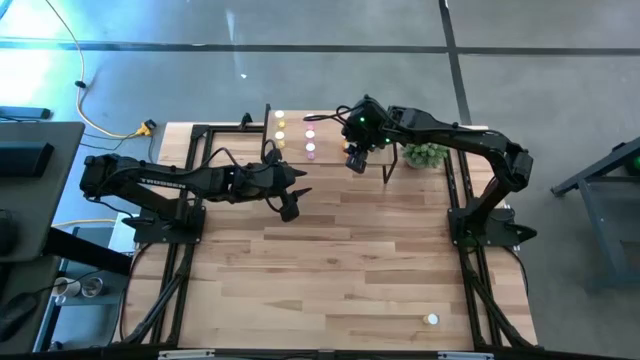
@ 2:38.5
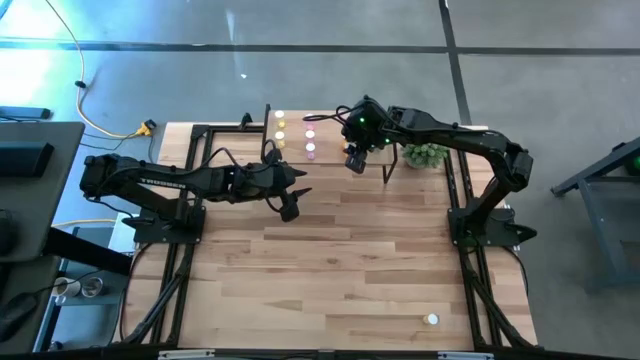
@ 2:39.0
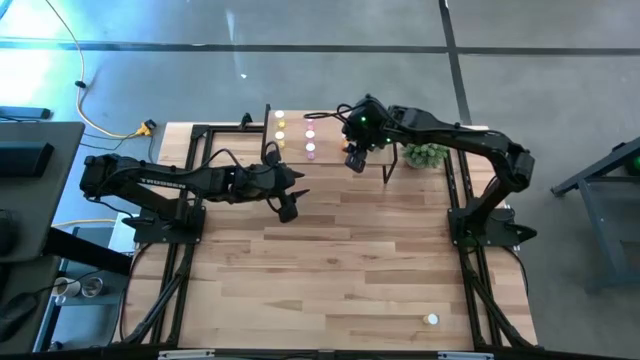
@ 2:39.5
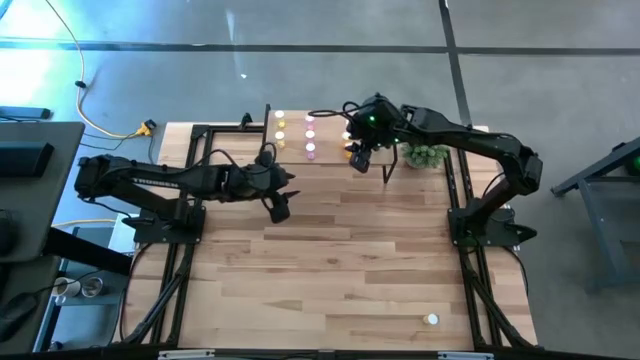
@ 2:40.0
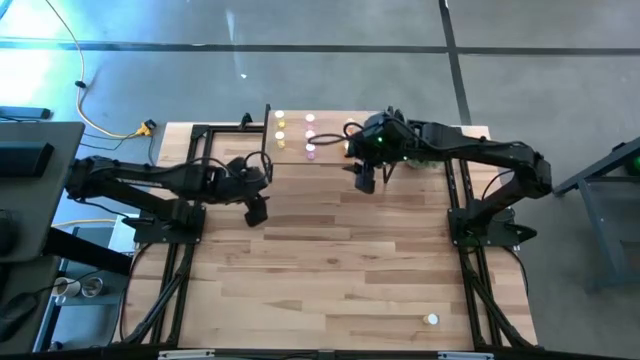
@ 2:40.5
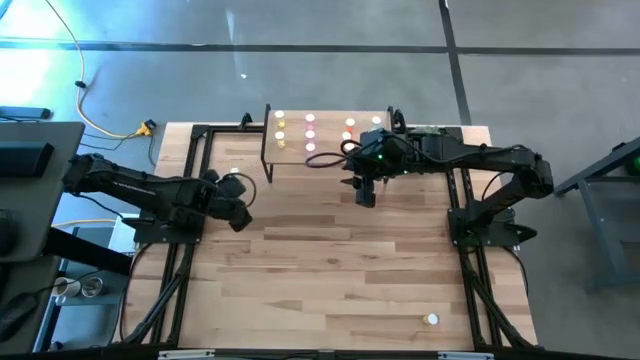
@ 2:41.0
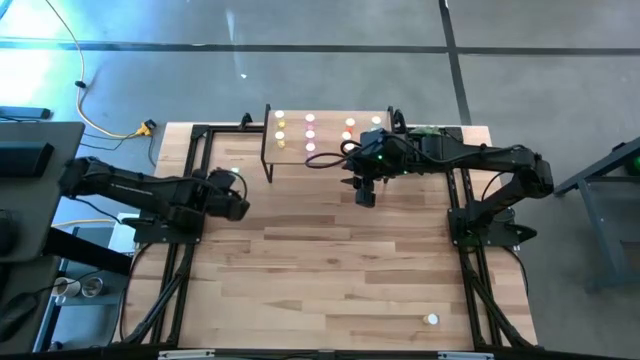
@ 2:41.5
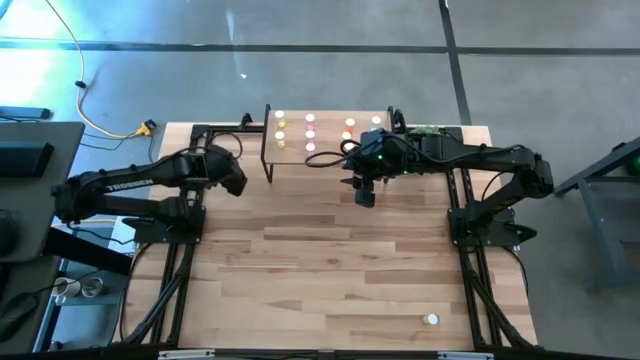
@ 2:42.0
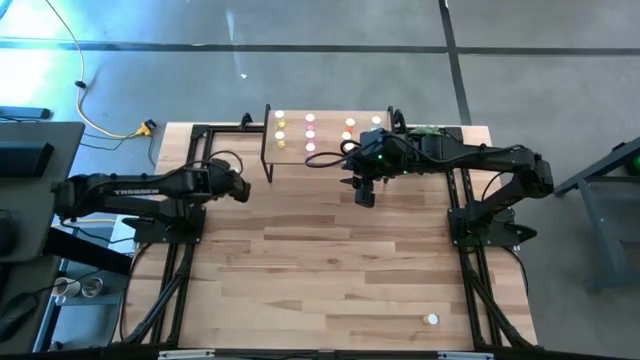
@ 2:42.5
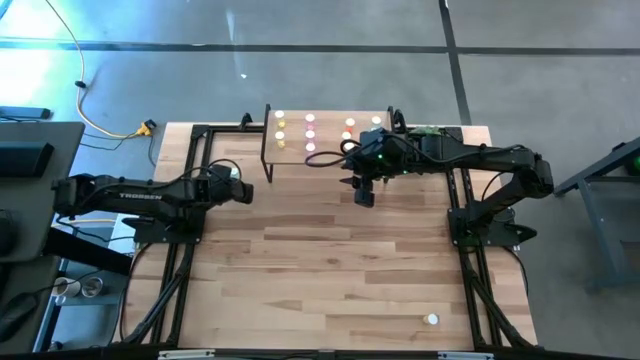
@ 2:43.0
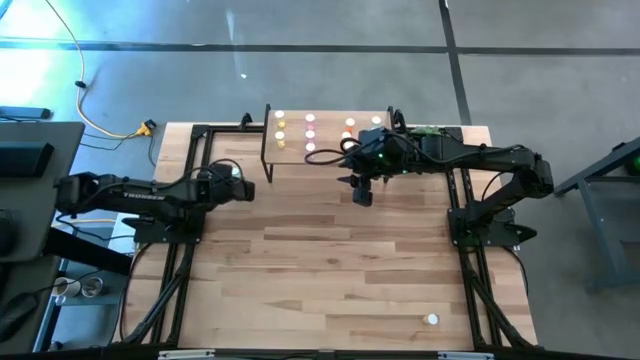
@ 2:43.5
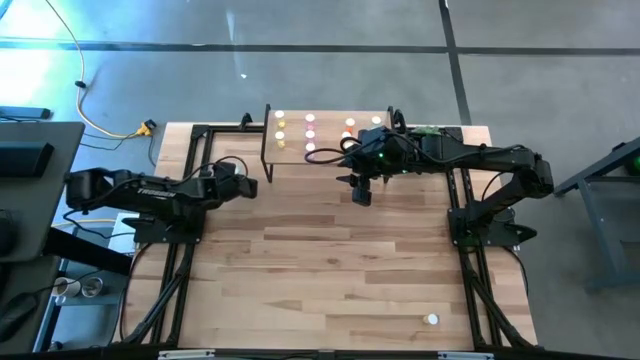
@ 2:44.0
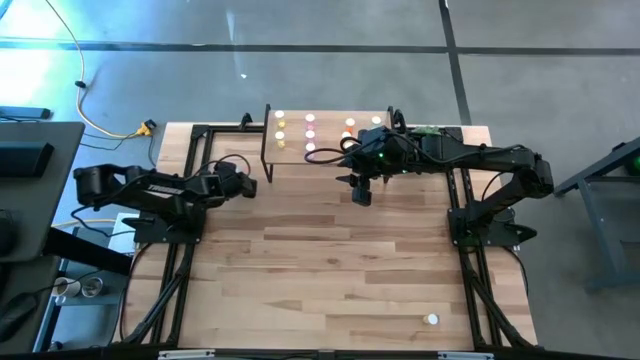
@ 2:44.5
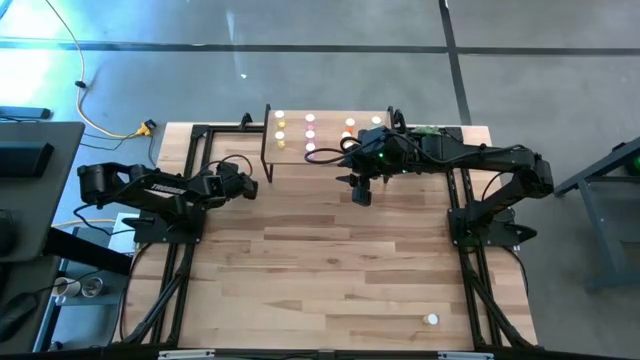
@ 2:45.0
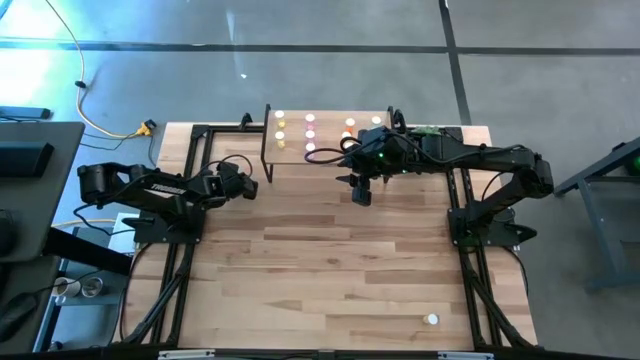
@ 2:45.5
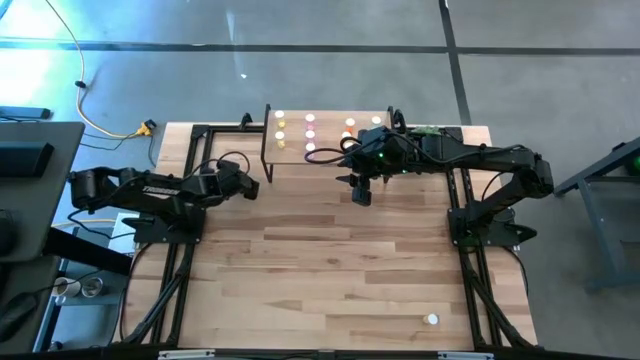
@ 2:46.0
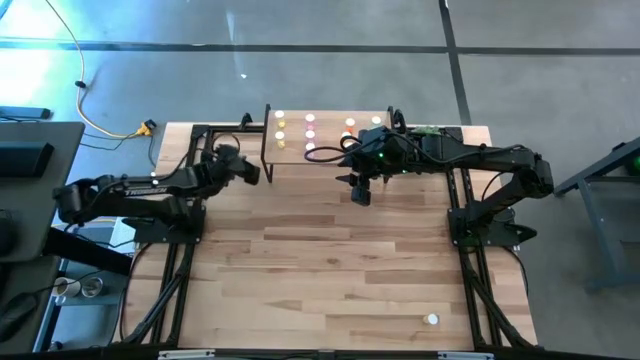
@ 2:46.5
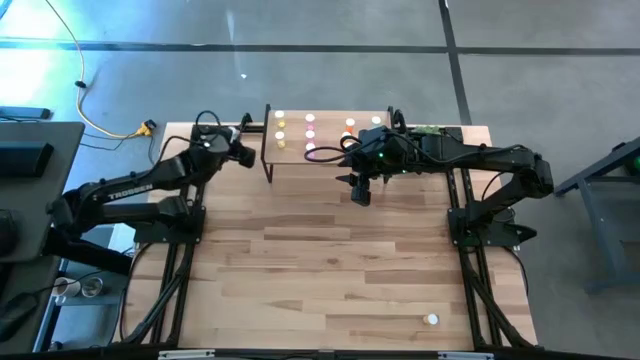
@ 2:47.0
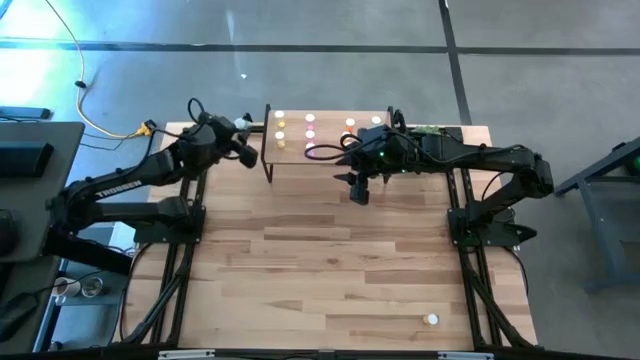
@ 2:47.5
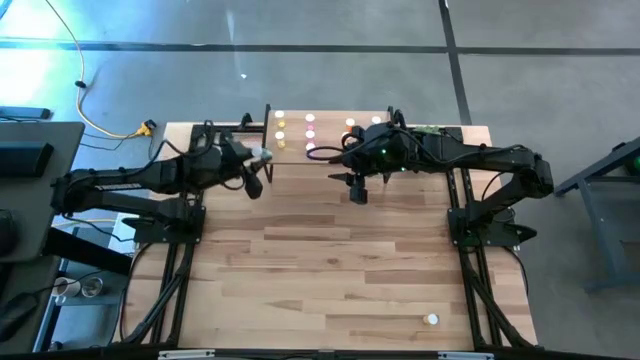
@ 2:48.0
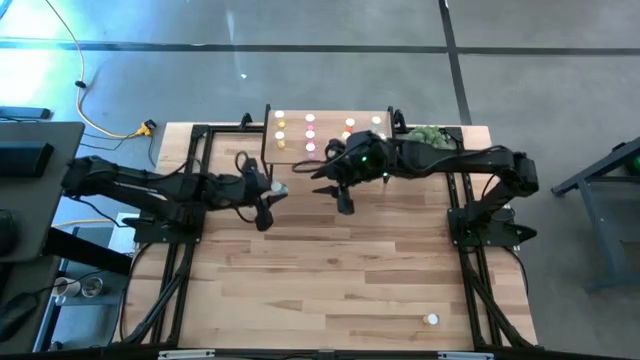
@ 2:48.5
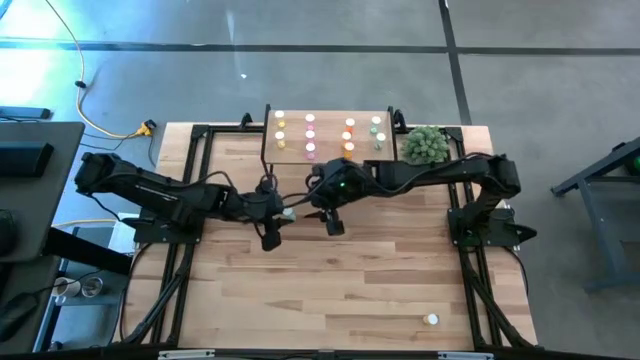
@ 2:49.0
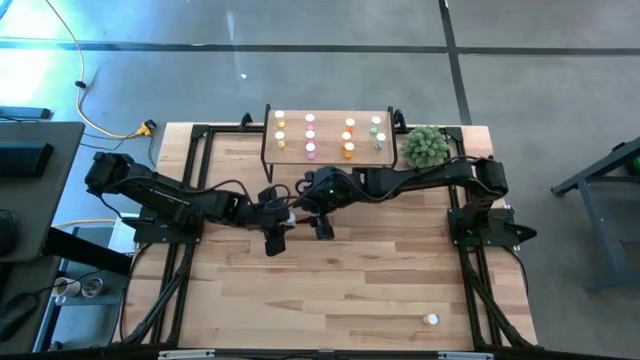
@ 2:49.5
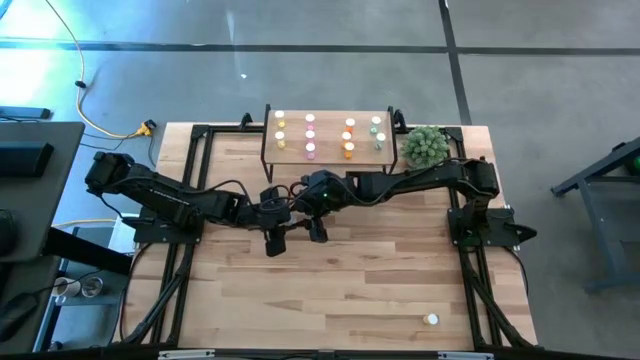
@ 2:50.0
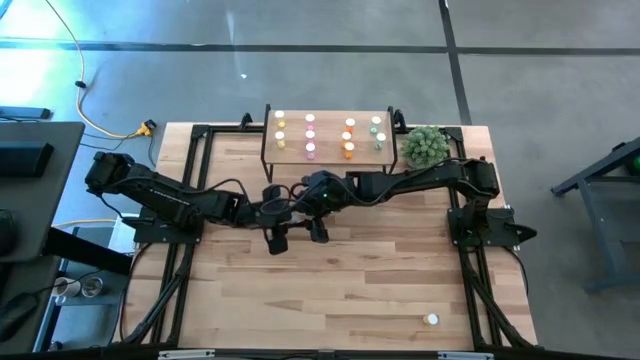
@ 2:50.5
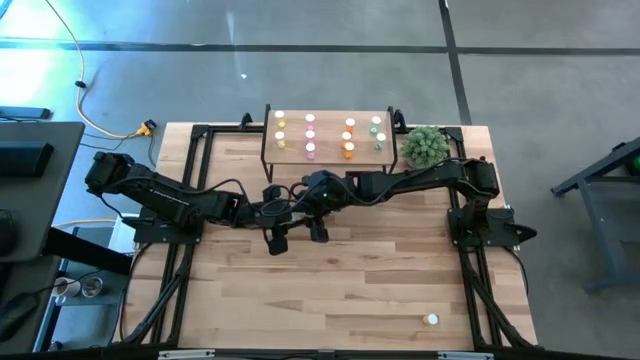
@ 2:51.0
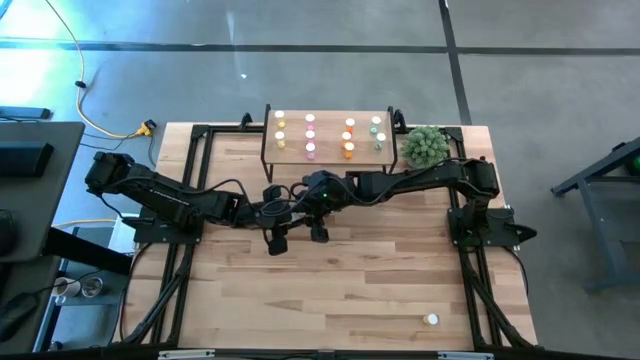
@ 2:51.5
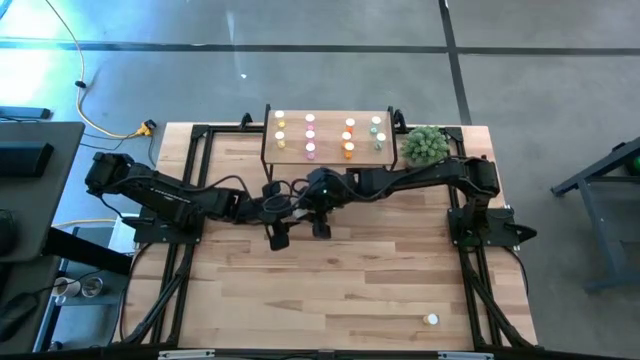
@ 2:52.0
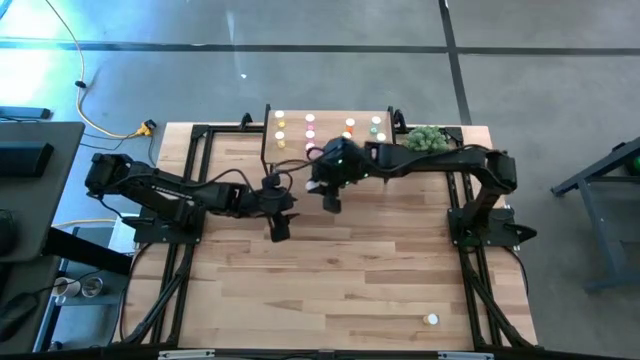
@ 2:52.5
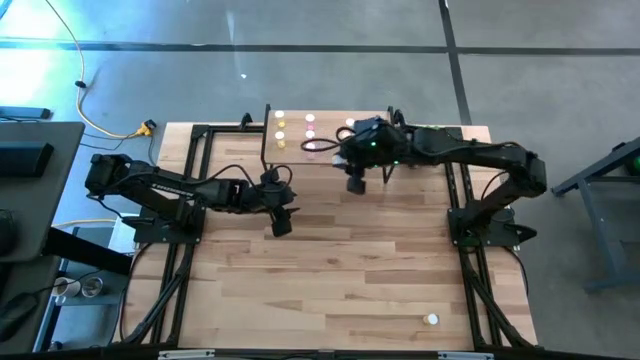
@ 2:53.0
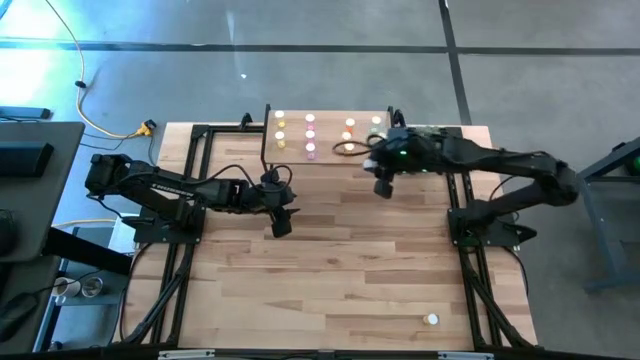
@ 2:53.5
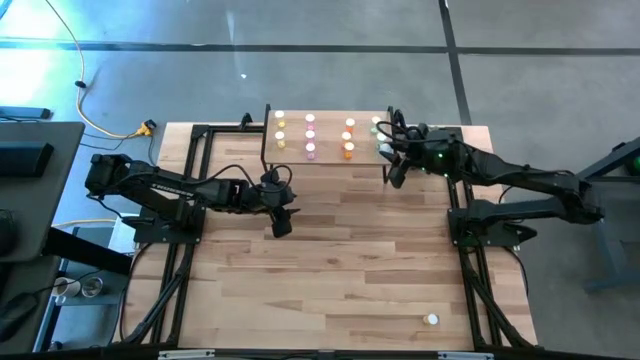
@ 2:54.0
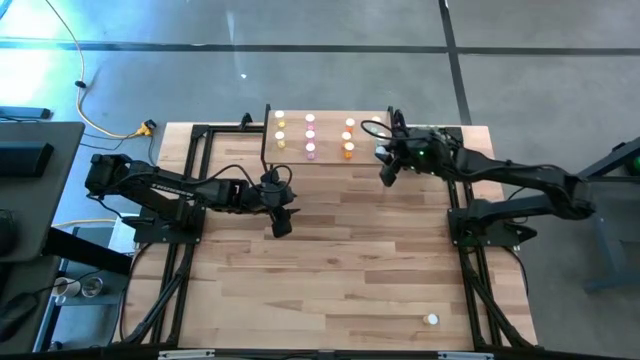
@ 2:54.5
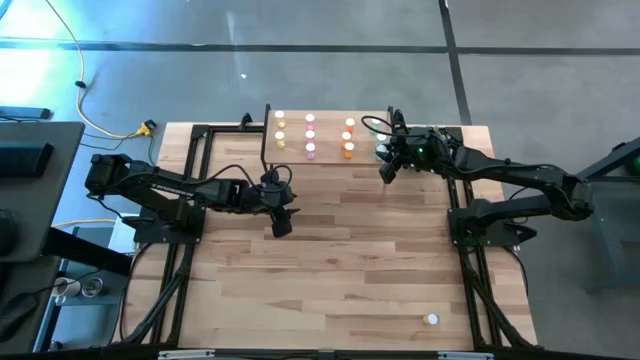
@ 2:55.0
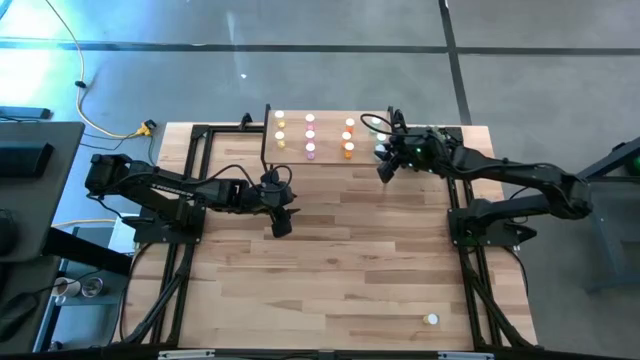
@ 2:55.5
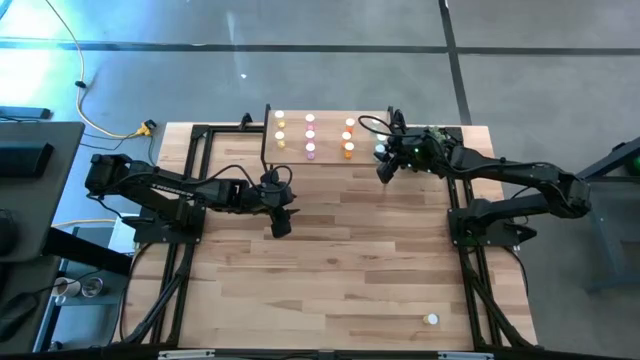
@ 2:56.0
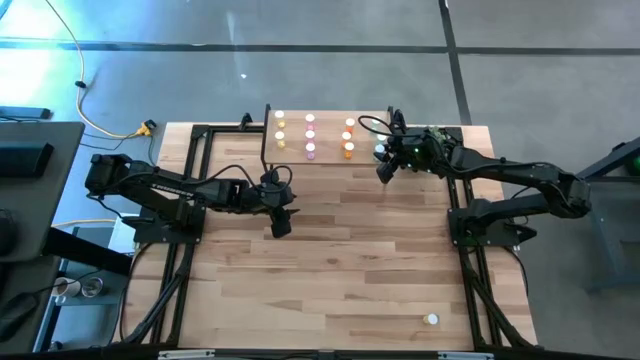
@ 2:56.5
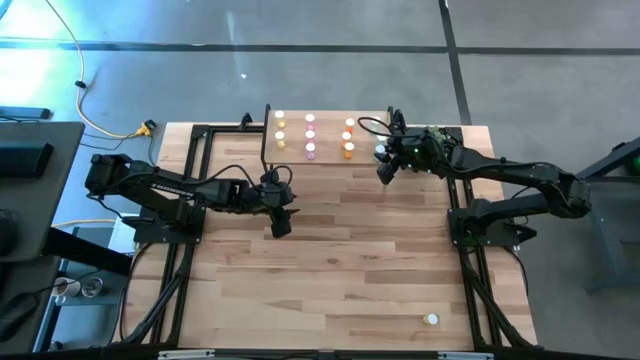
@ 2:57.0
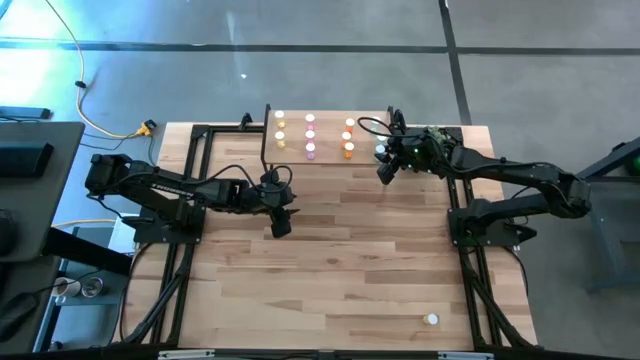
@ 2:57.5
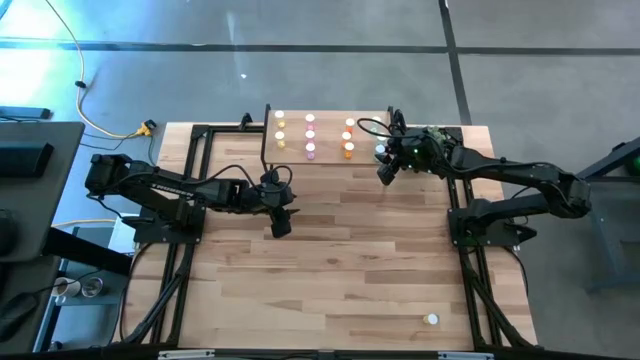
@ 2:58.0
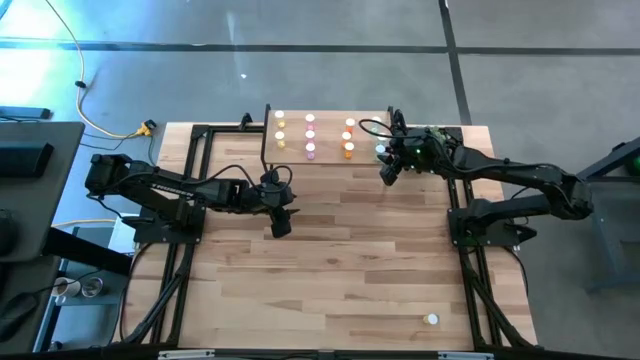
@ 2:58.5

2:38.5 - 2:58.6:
Task: Pick and place medicine bottles onto shelf by color
Put the blue pill bottle on the shelf aligned with the other blue pill bottles

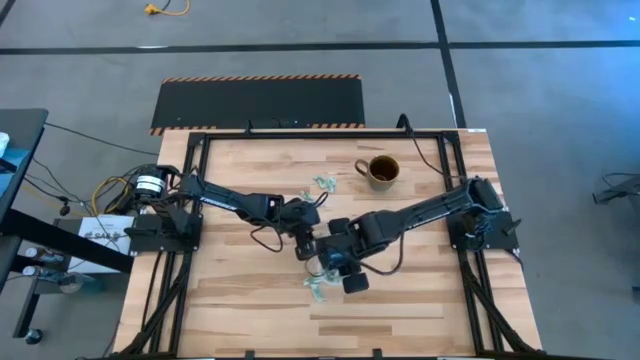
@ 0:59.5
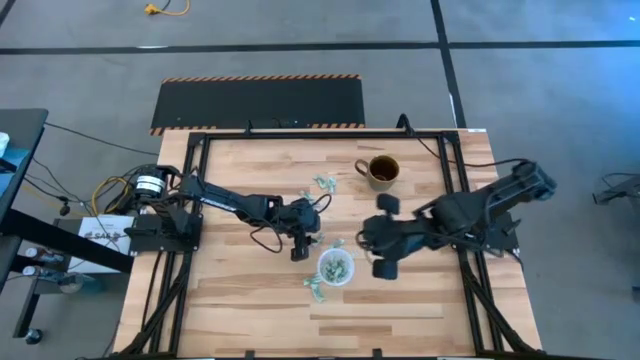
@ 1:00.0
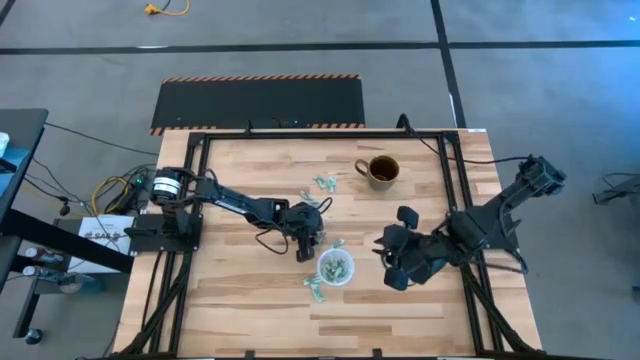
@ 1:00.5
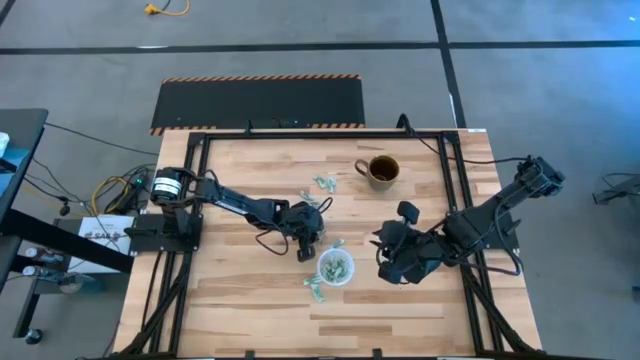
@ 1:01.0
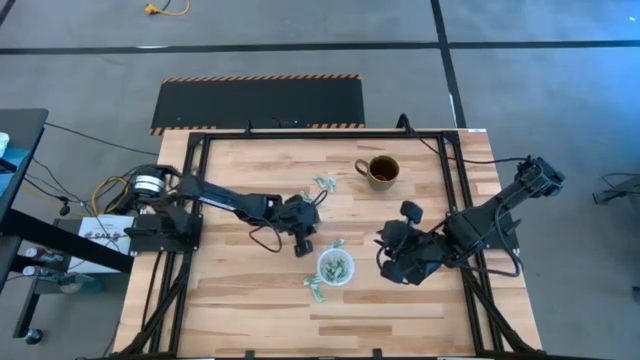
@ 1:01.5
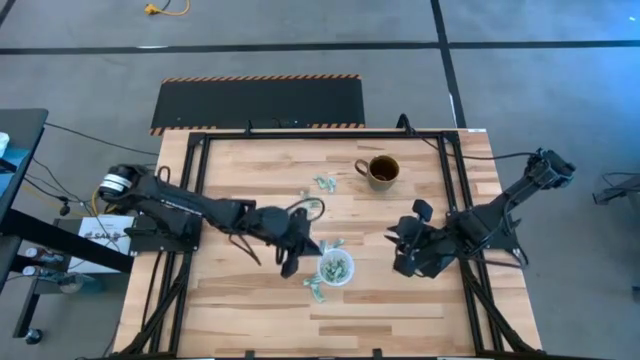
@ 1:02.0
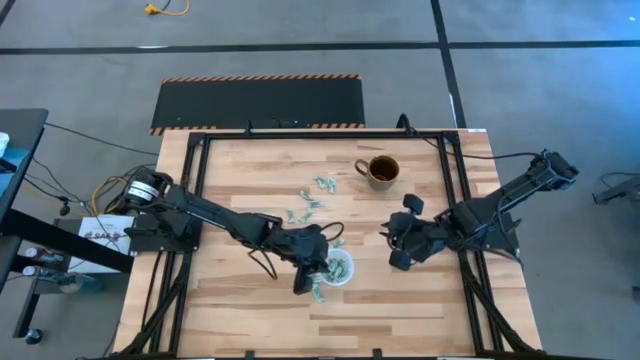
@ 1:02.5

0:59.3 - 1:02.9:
Task: Pick and place Stevia / Truvia into bins
Put the green stevia packet into the transparent container
